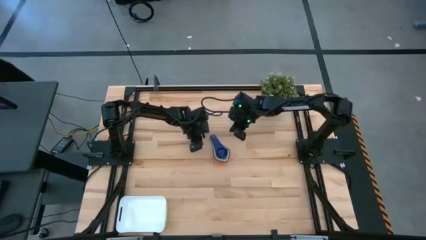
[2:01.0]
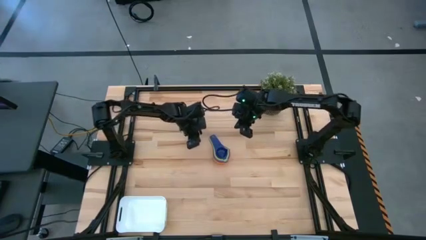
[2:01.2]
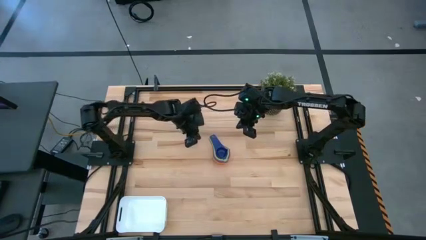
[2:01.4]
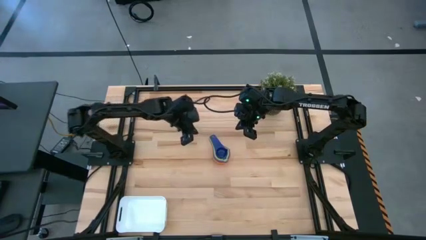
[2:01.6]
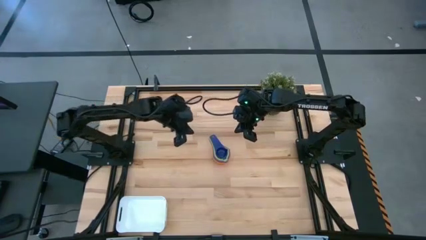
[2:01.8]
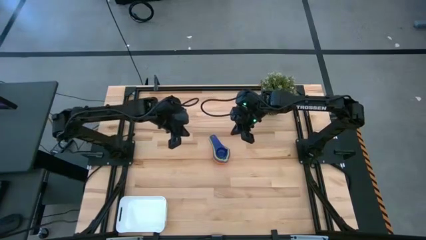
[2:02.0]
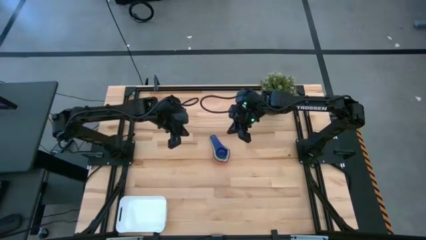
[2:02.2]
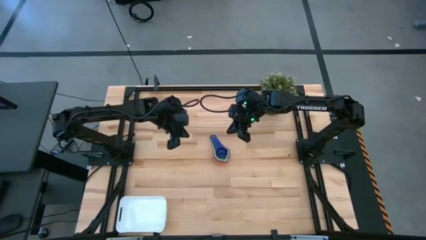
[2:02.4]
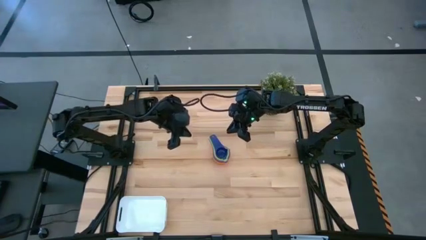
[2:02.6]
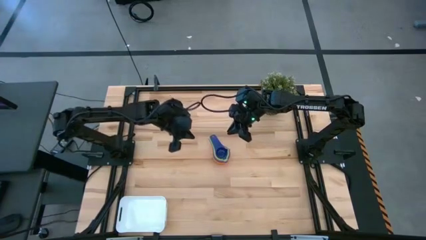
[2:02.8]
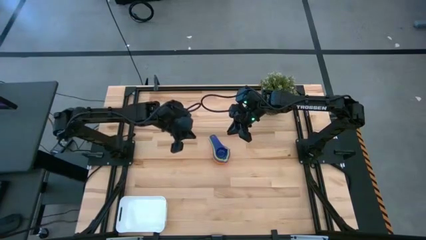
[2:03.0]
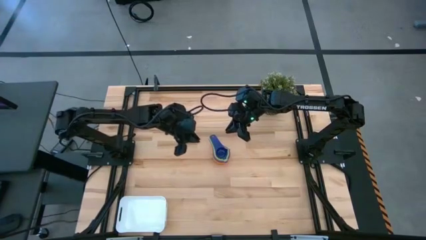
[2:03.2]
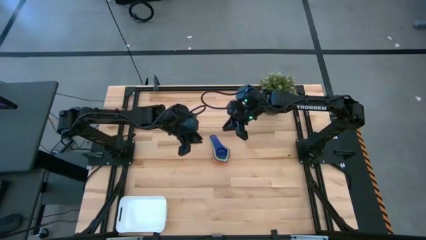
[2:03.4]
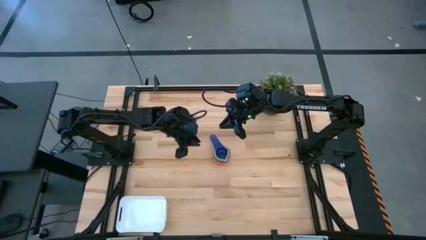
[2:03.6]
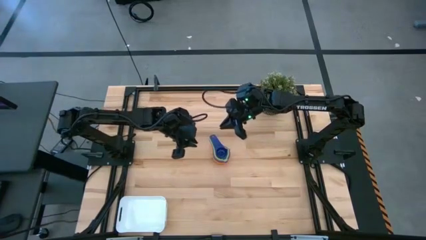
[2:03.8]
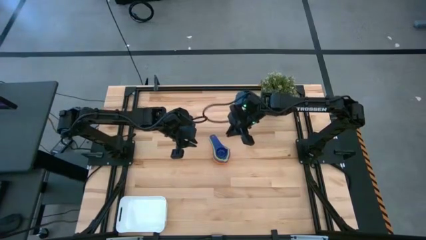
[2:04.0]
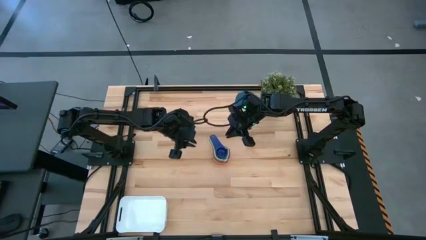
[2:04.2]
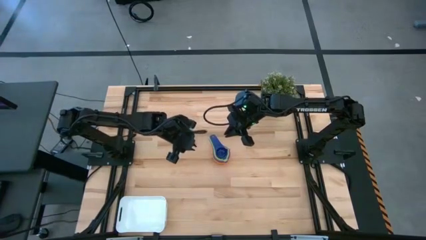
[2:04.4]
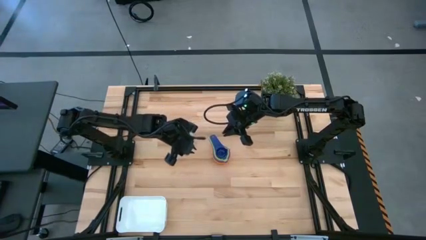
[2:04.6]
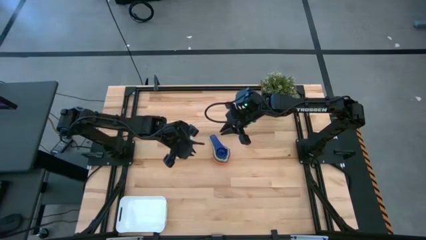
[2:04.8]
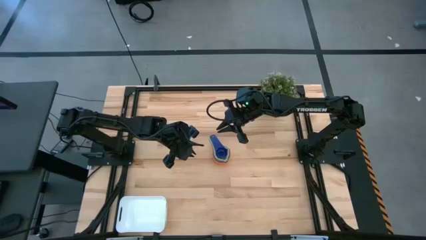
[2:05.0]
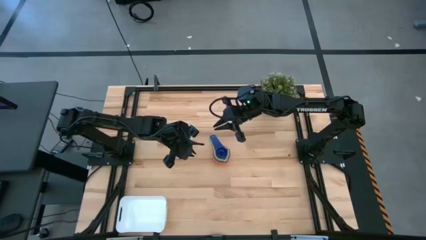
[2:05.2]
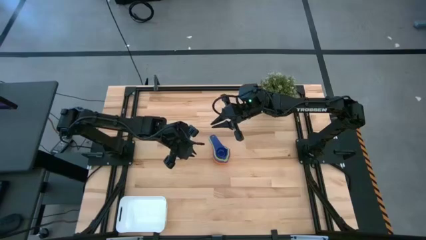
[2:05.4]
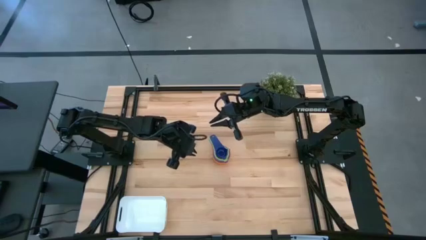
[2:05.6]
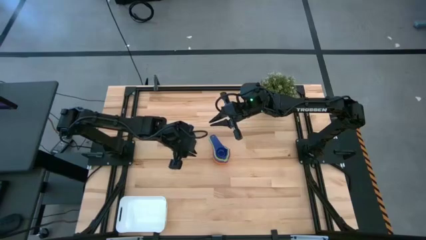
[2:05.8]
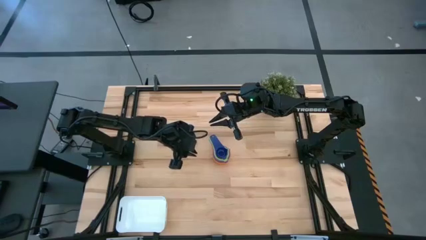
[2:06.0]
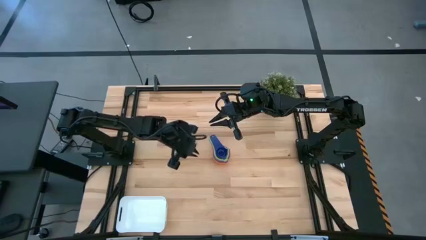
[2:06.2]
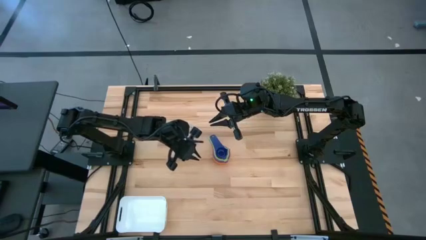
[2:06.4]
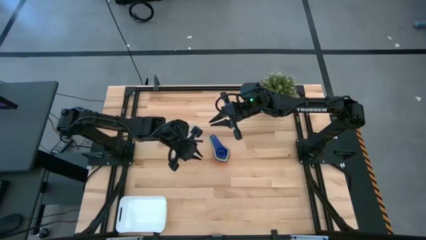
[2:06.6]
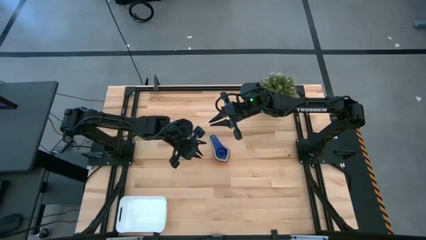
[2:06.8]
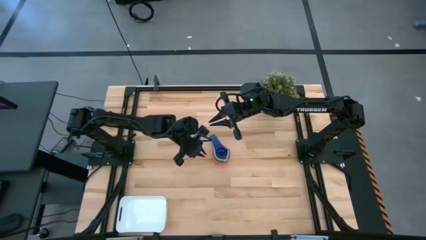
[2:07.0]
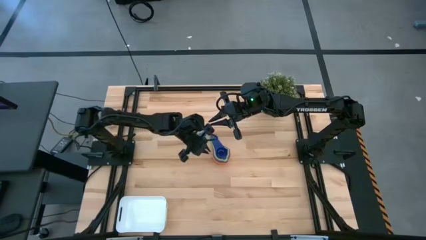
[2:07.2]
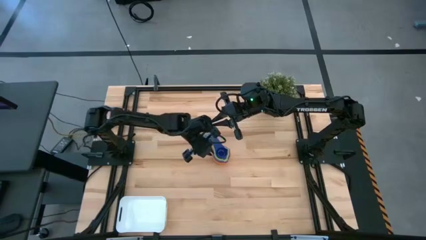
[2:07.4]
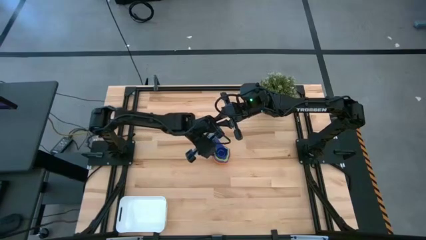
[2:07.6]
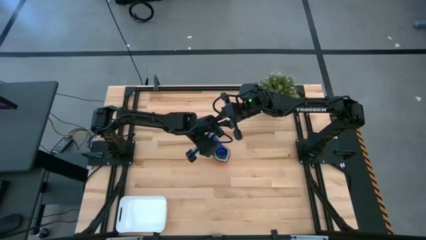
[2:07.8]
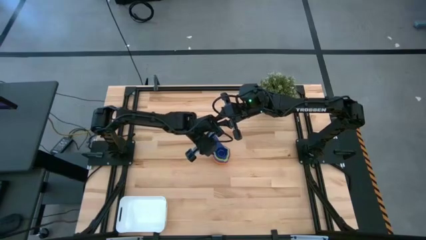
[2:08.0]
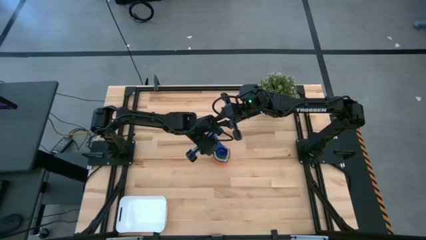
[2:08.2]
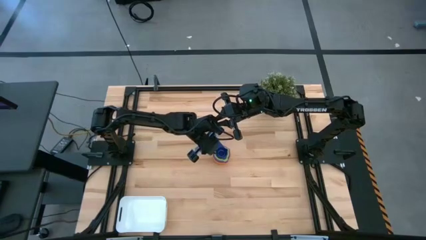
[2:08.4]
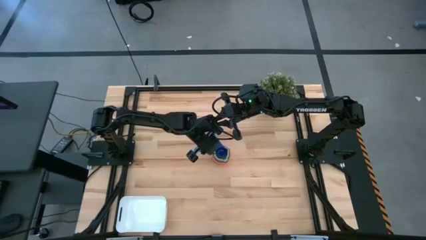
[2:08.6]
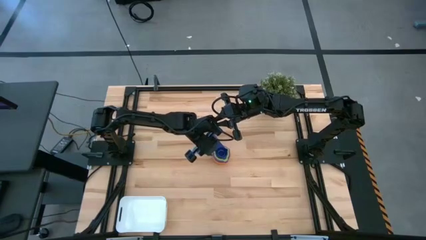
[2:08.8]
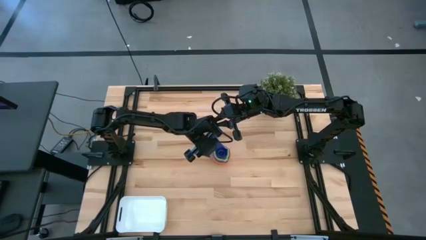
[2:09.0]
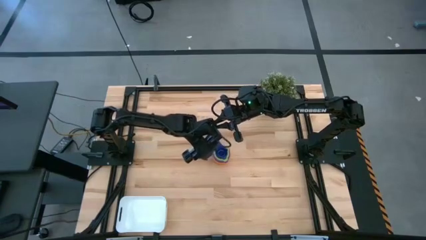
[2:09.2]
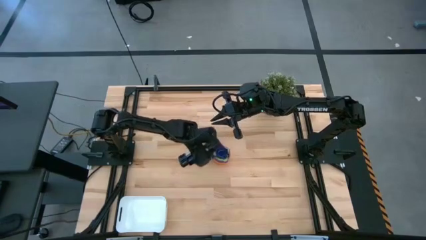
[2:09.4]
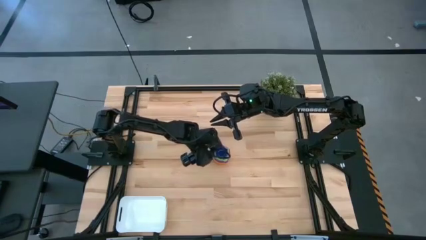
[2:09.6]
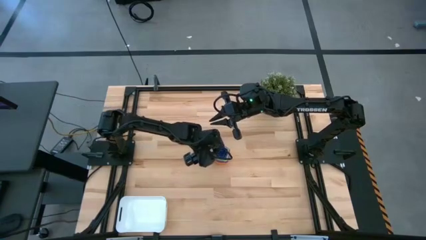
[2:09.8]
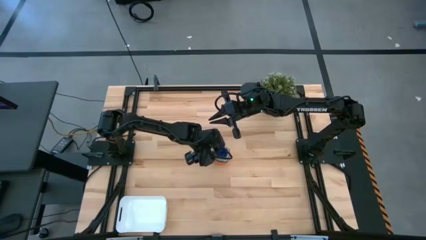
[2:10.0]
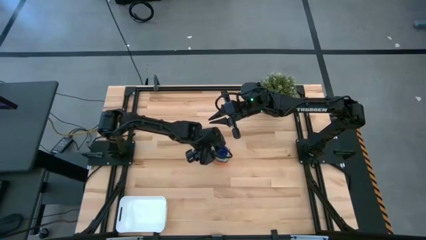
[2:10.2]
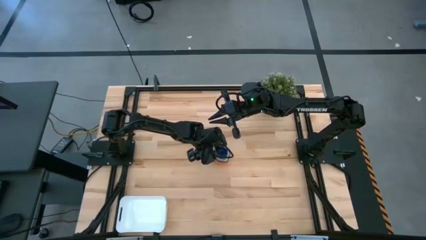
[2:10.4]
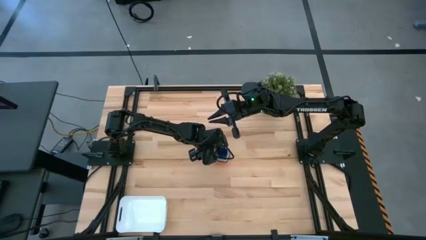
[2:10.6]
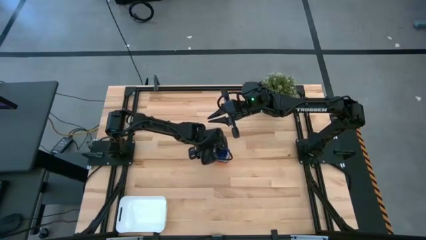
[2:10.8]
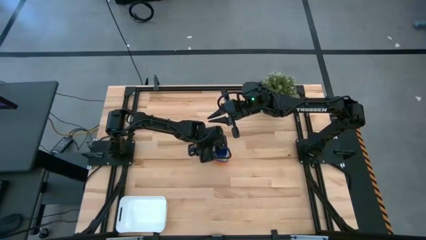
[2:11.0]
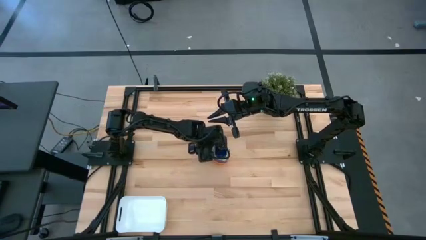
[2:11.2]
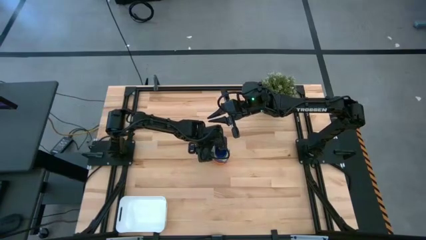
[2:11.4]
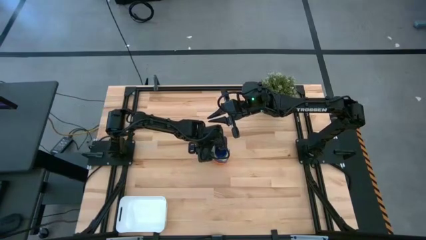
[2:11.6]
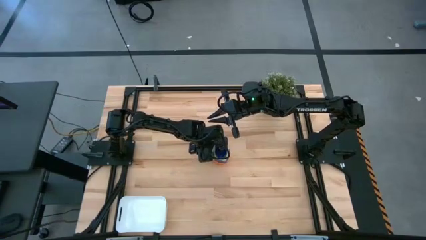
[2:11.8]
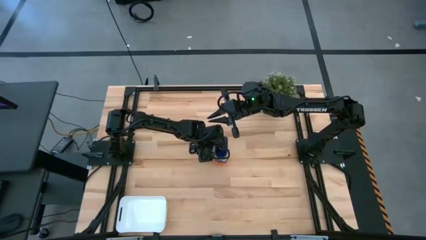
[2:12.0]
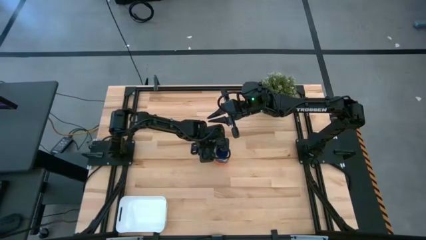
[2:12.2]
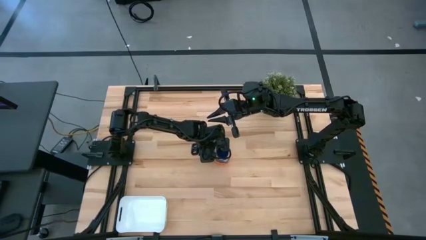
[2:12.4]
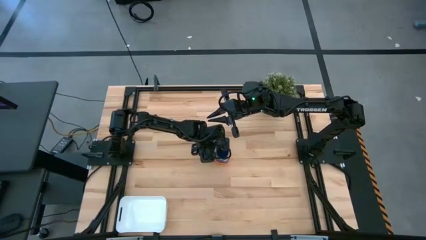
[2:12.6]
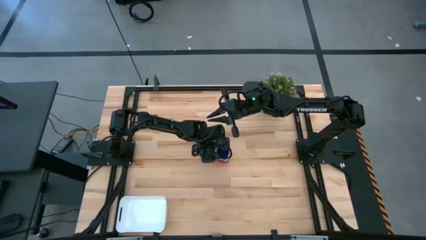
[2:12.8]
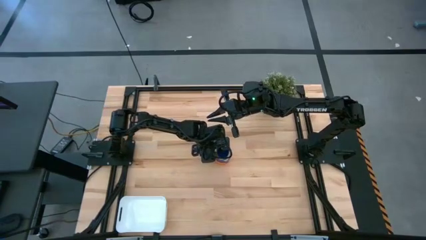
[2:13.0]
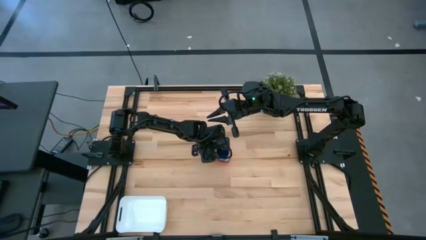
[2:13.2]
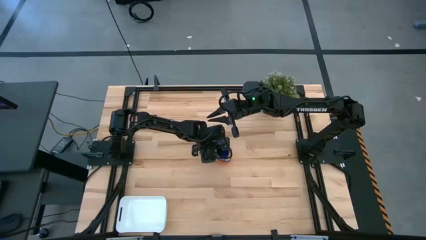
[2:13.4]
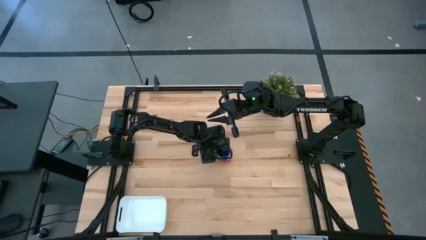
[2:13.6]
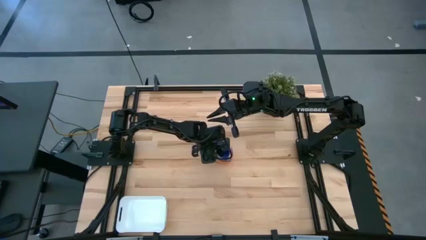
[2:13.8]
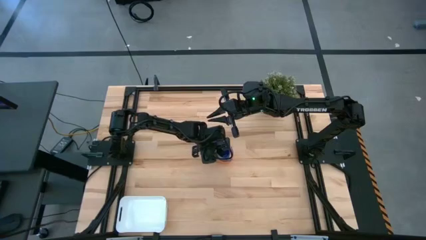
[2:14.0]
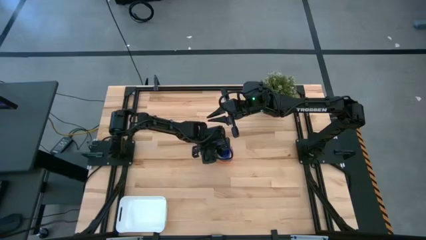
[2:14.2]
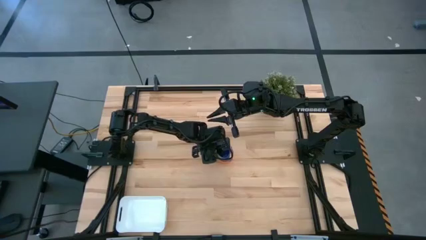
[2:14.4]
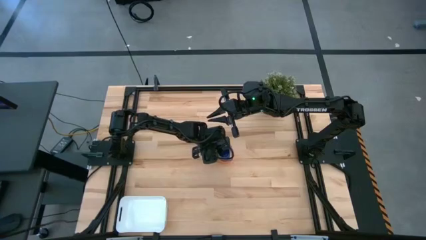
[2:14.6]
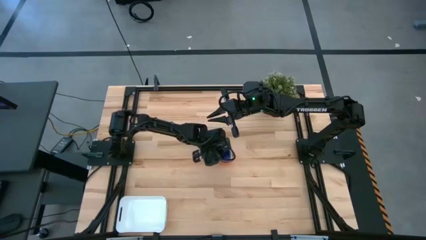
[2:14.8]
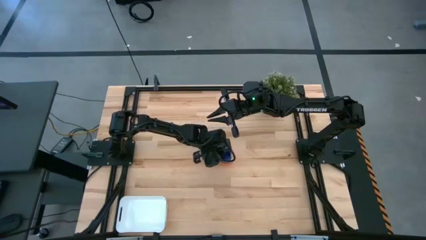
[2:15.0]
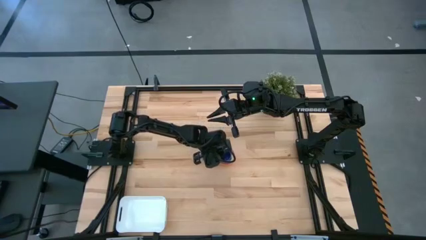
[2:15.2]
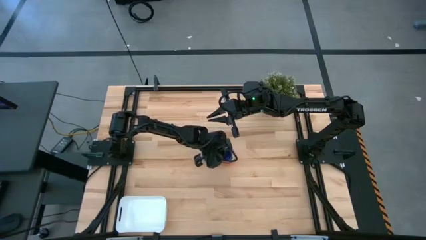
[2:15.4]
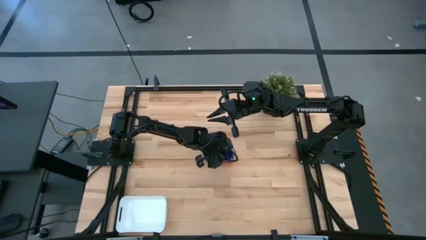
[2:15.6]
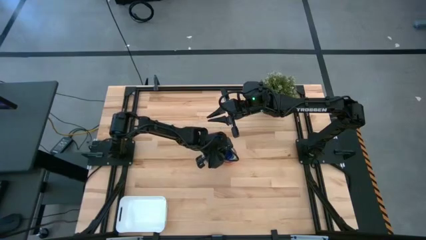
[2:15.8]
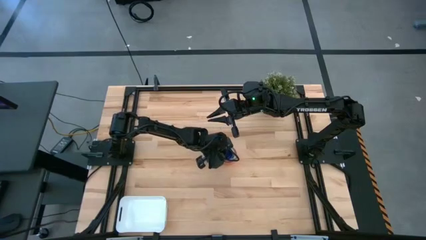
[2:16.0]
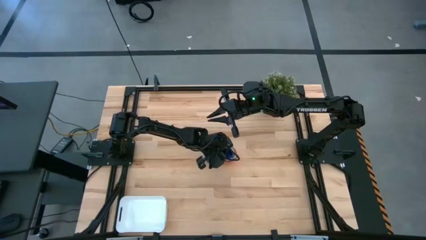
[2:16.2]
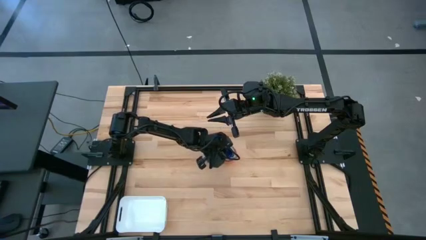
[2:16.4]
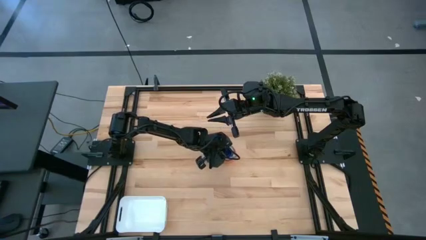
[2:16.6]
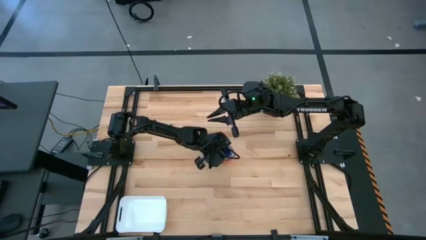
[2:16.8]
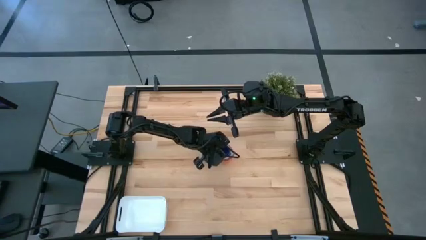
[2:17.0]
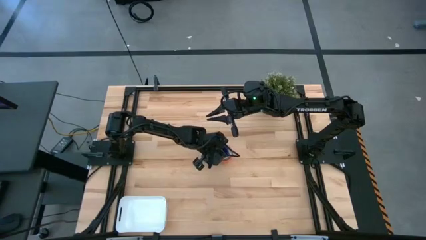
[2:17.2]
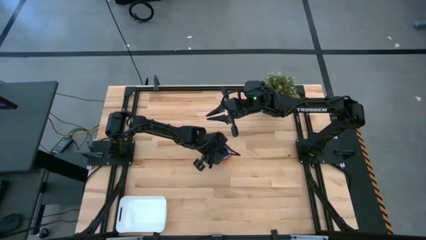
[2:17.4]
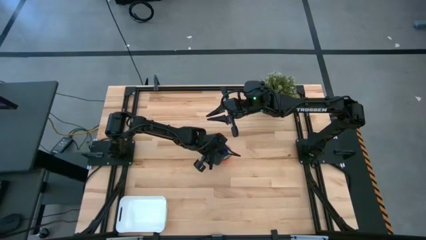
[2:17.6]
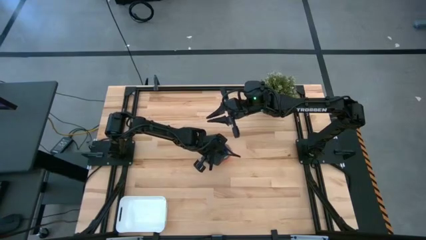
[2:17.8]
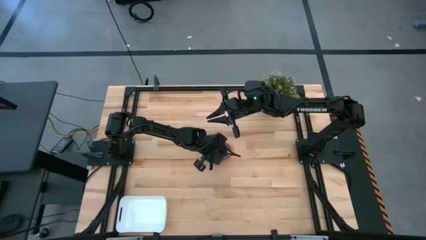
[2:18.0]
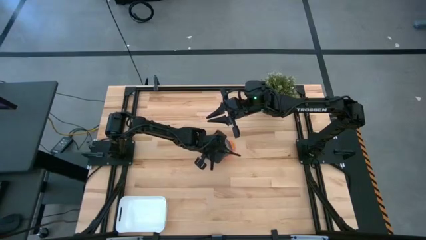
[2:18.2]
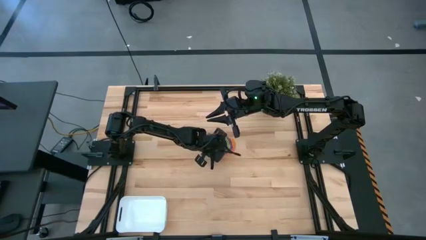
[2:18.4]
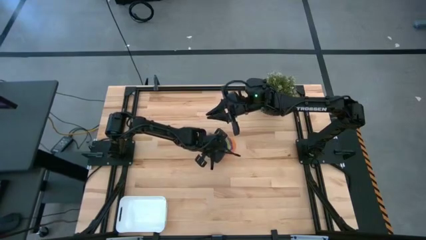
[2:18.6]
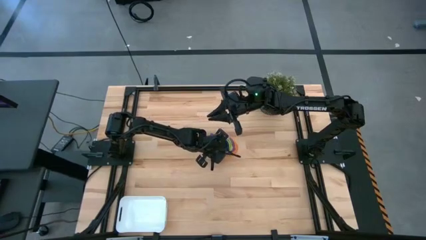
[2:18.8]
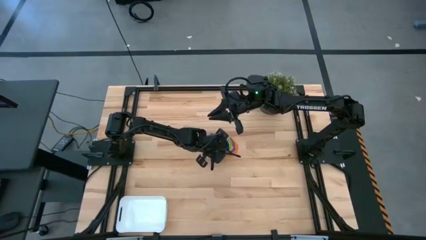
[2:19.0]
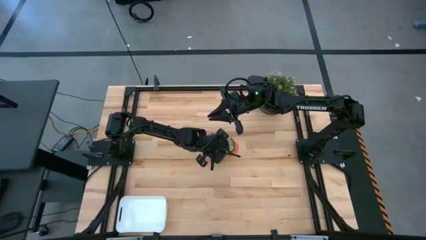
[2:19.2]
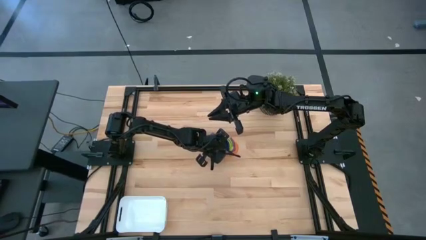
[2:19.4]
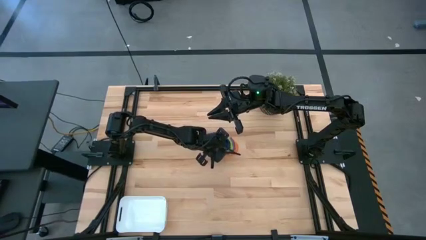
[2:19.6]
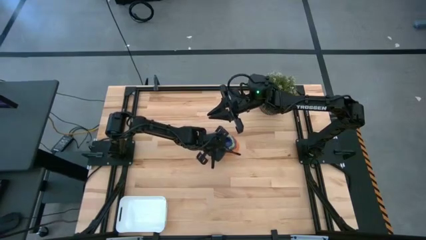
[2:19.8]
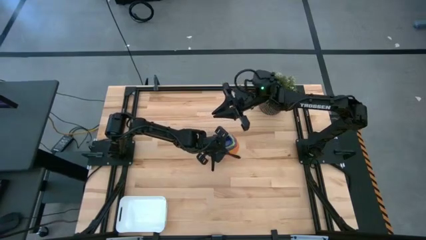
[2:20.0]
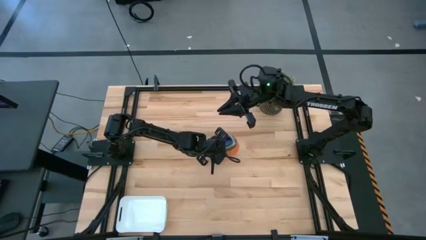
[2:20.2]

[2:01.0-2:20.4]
Task: Nest measuring cups in basket
Put the nested measuring cups into the white bin
